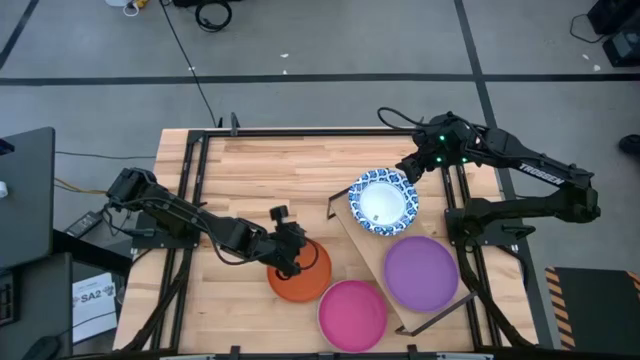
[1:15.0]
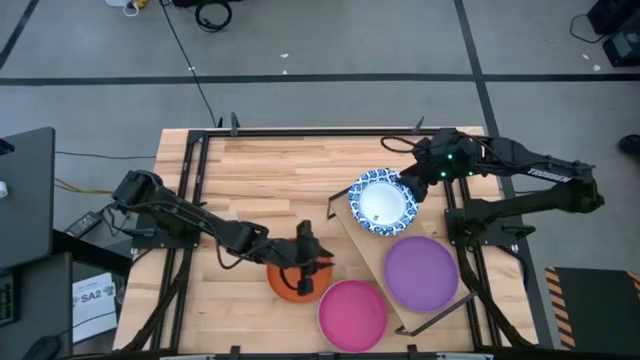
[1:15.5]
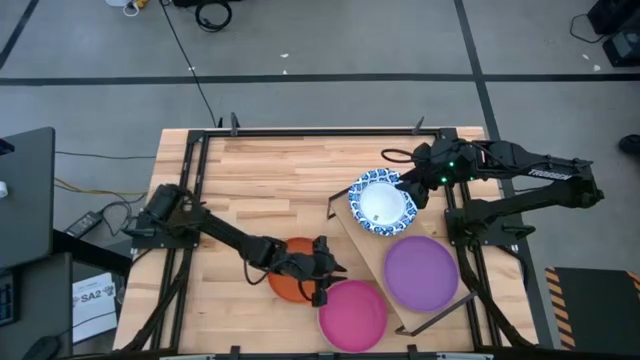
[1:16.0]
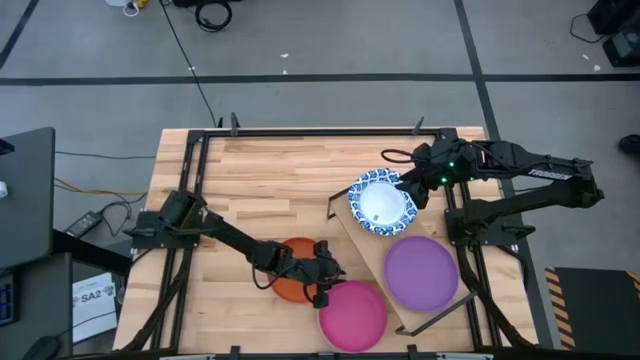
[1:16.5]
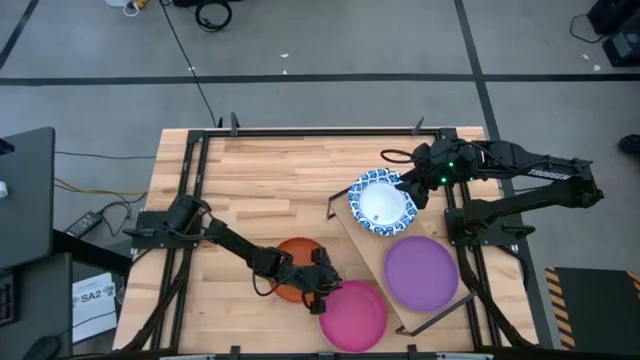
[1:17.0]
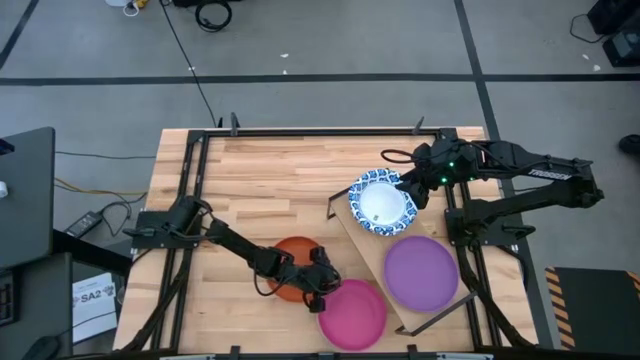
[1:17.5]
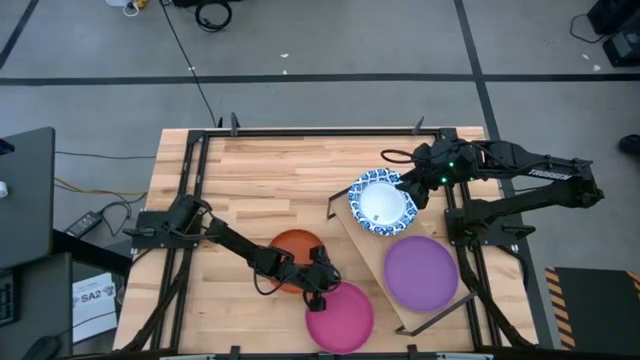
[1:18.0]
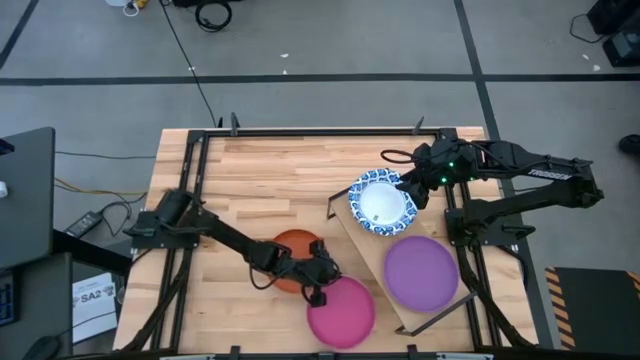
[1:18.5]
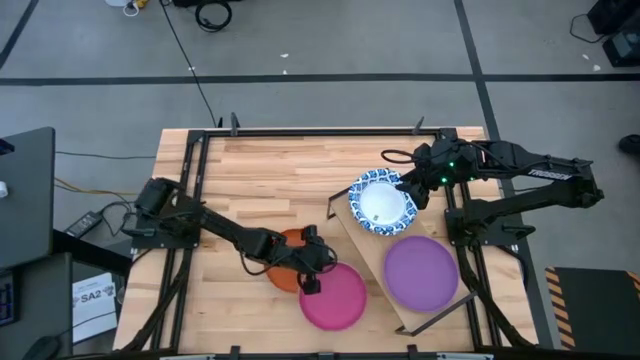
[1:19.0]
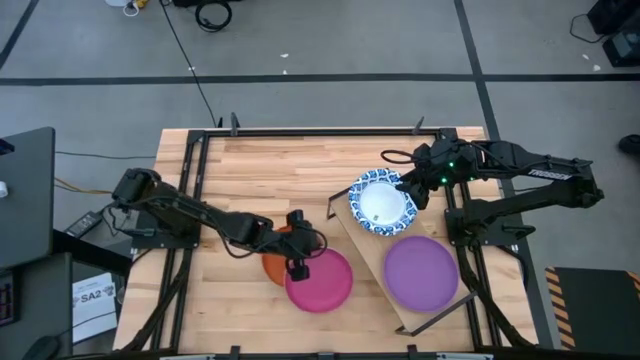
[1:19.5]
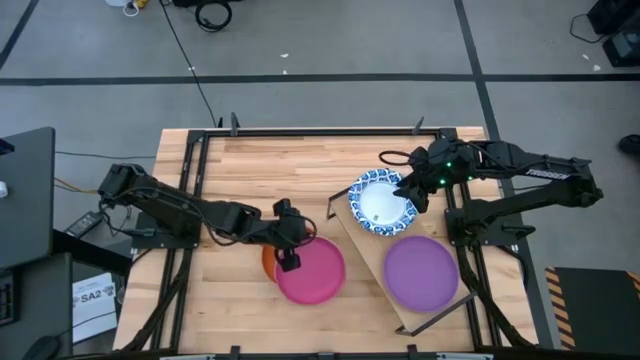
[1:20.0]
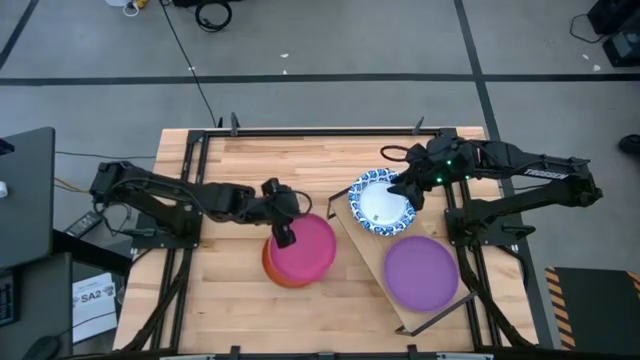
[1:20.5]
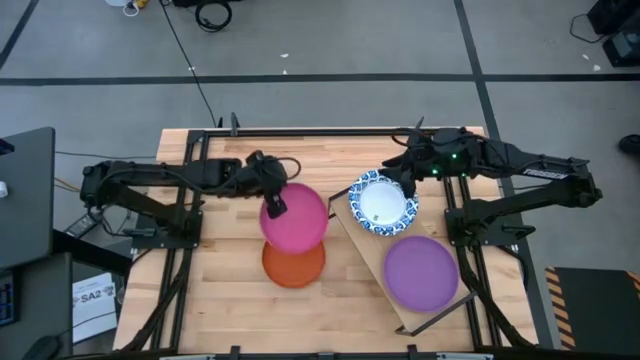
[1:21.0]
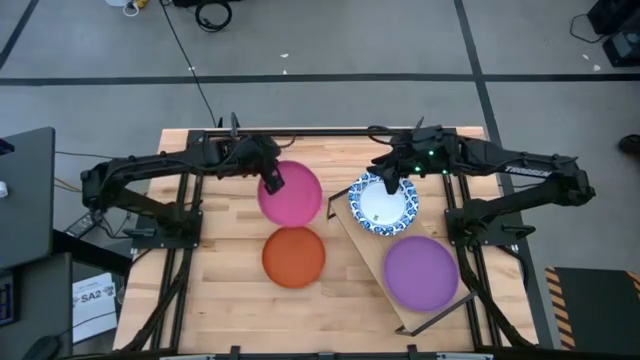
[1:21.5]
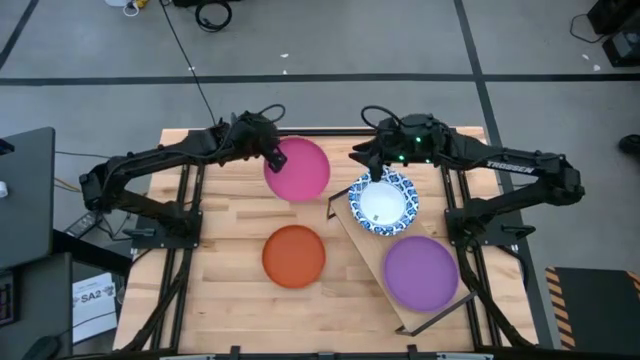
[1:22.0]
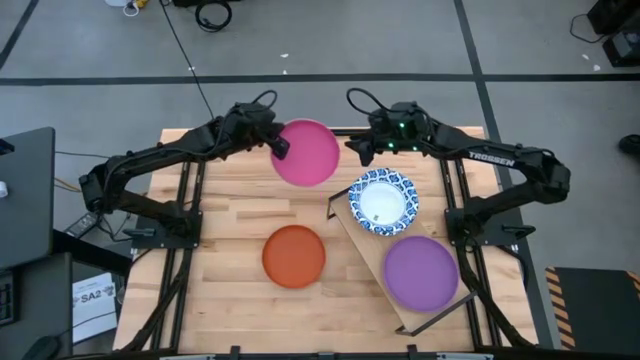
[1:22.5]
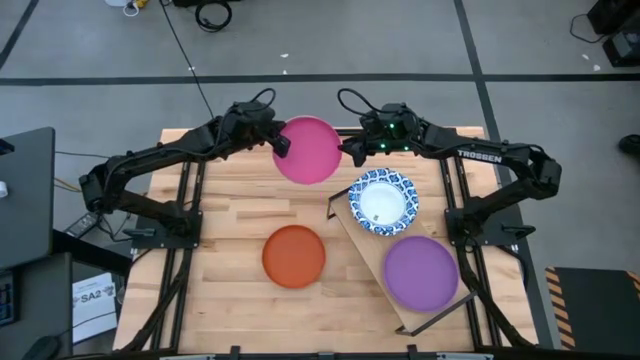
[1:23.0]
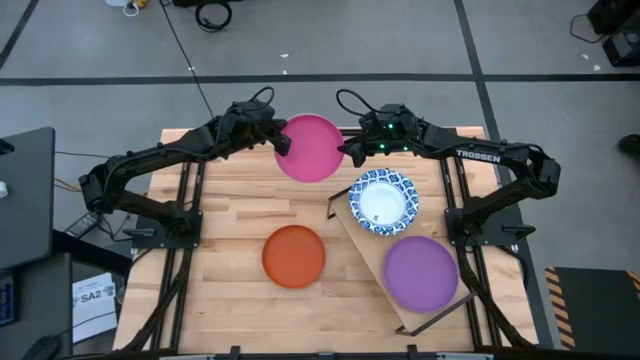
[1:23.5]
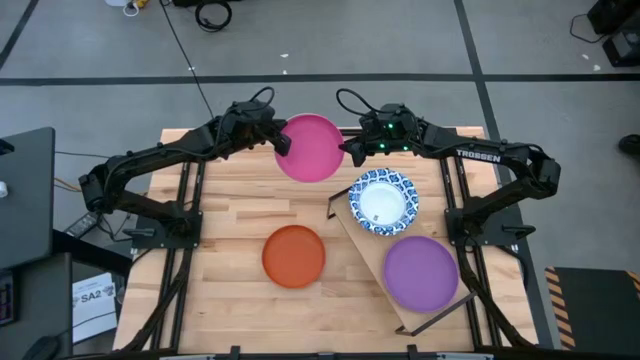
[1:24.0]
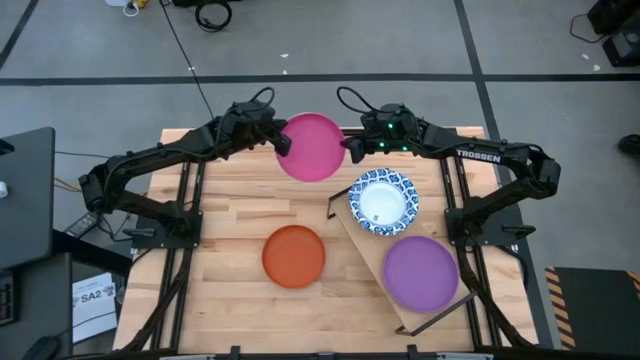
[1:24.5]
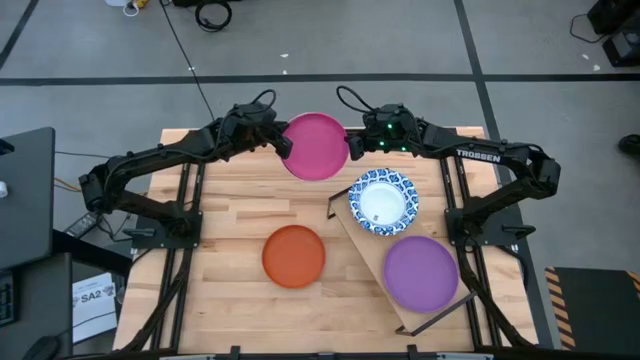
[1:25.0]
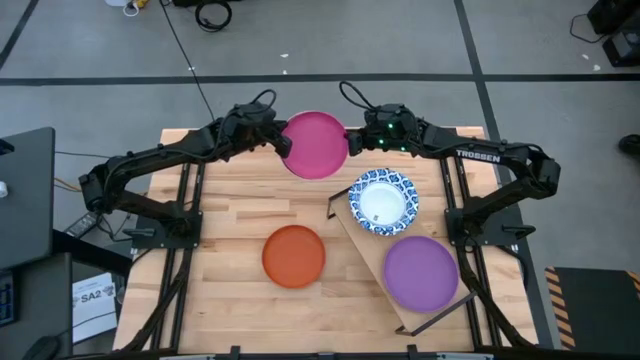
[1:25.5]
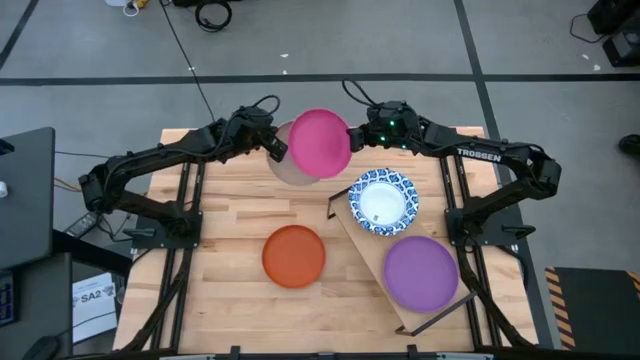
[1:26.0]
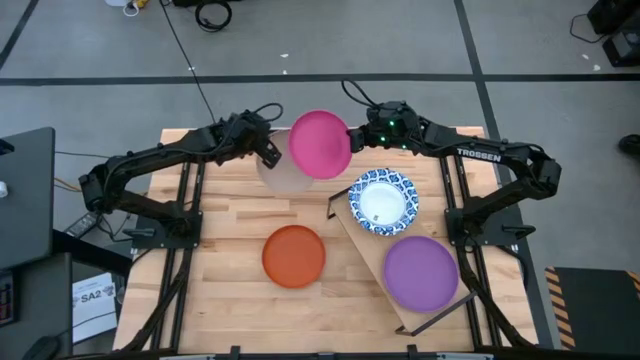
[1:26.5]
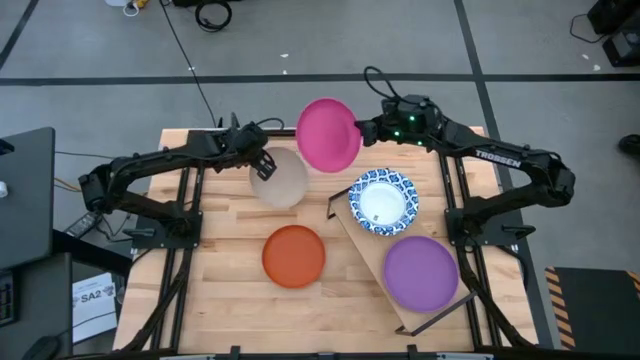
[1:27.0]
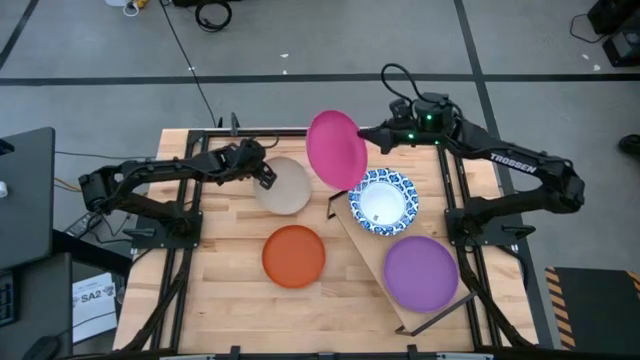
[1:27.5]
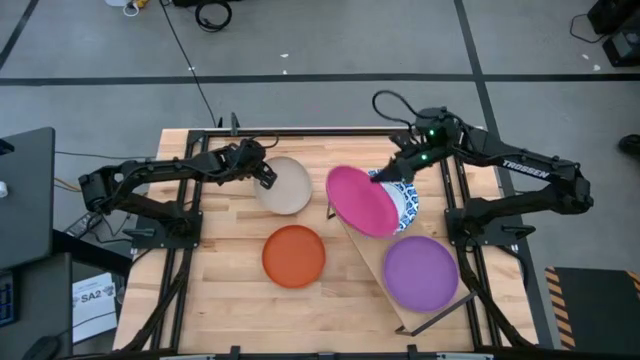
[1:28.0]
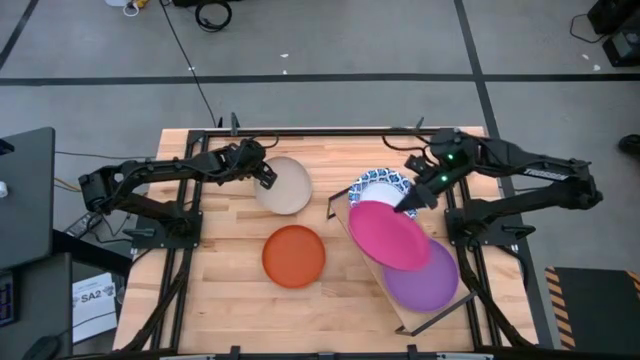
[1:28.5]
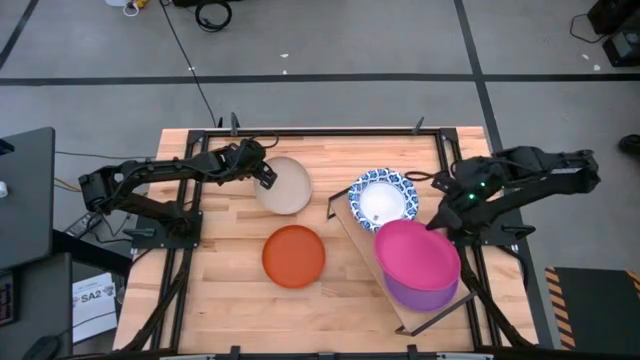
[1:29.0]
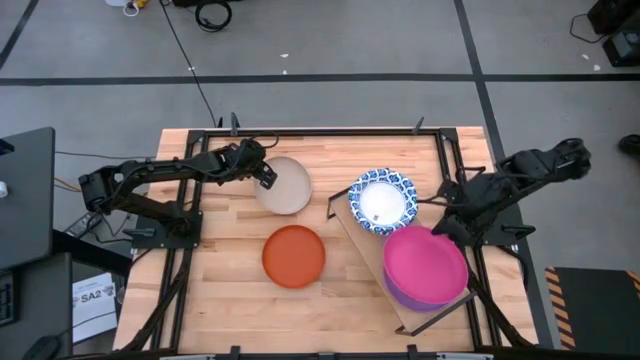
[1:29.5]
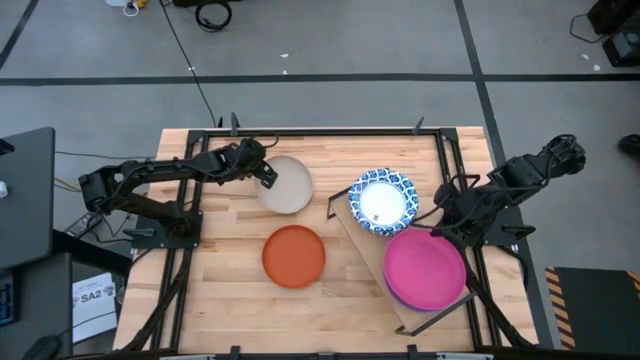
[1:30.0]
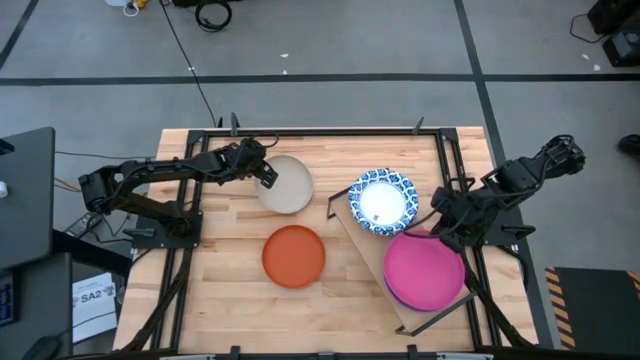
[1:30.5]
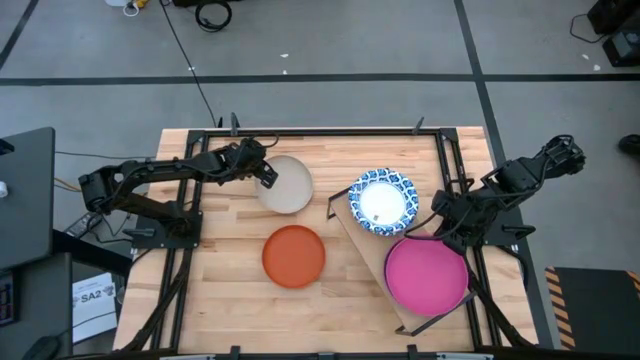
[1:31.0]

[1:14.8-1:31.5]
Task: Place and stack plates onto a shelf
Stack the pink plate on top of the purple plate on the shelf

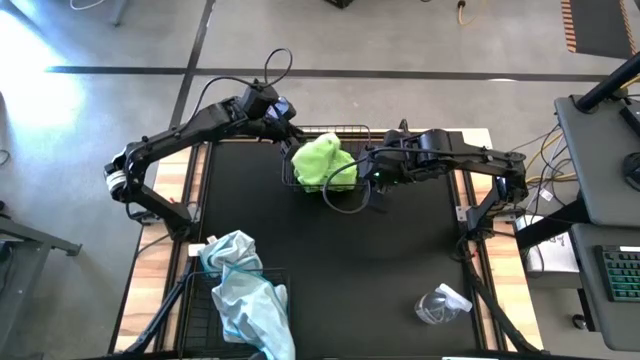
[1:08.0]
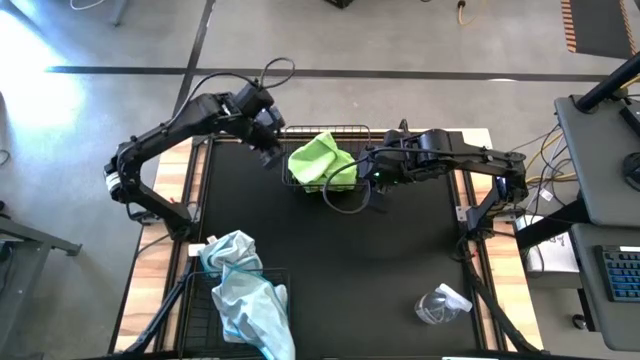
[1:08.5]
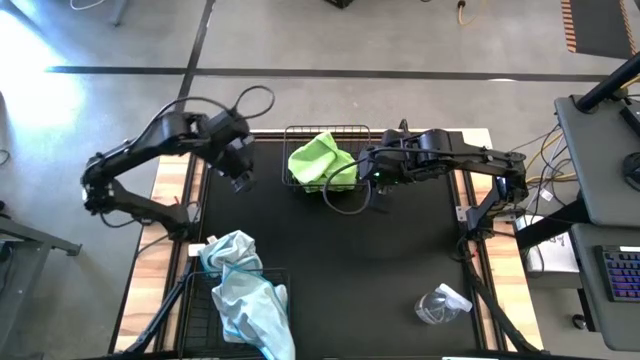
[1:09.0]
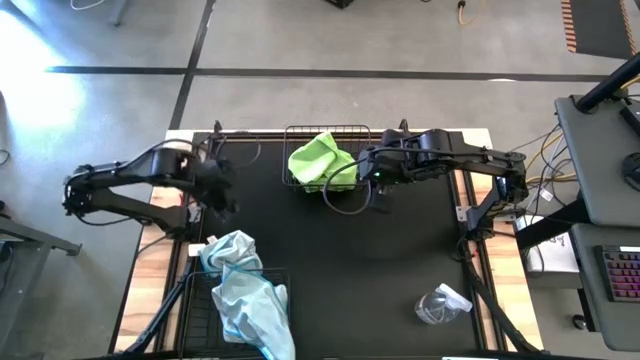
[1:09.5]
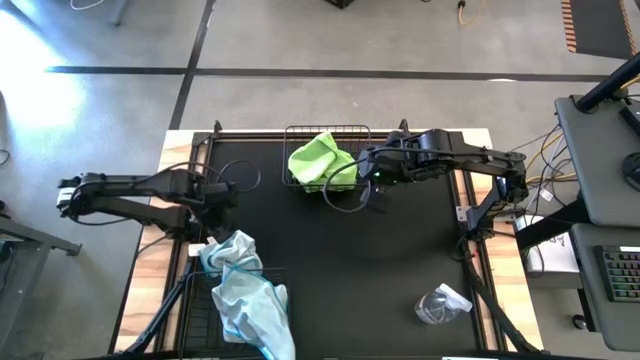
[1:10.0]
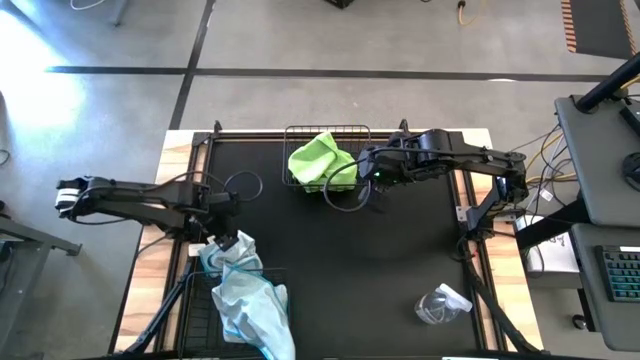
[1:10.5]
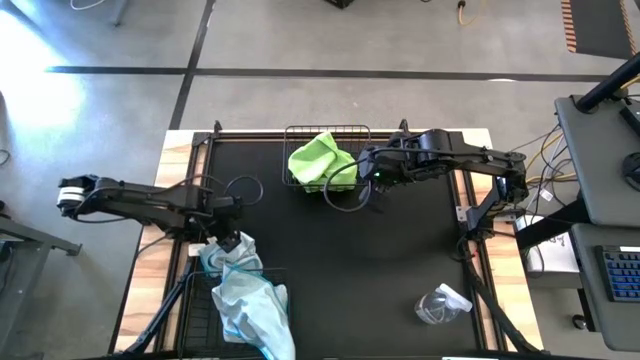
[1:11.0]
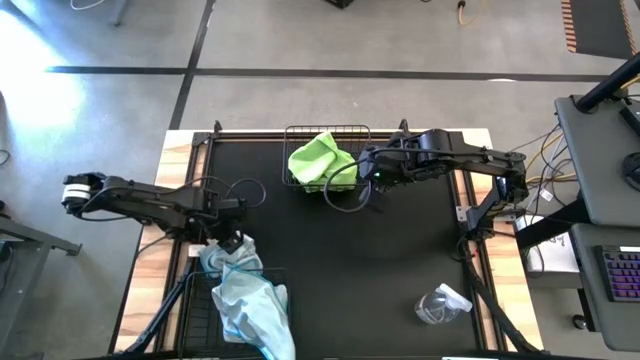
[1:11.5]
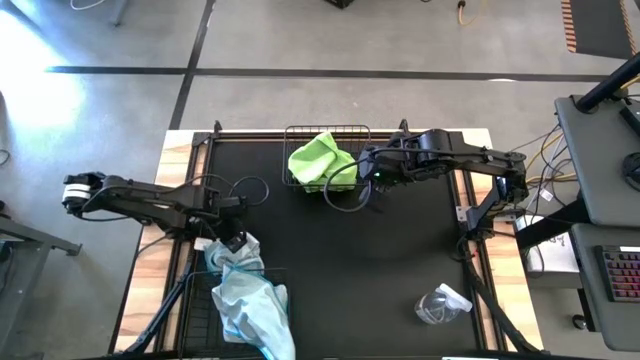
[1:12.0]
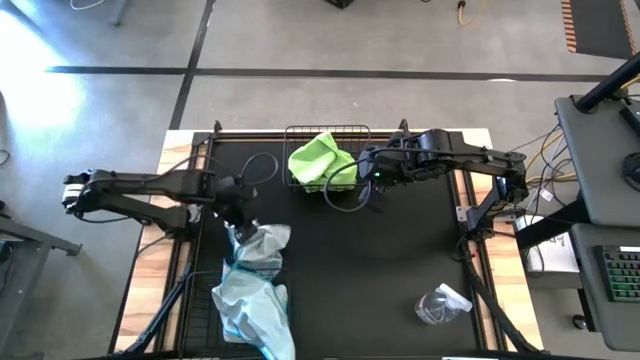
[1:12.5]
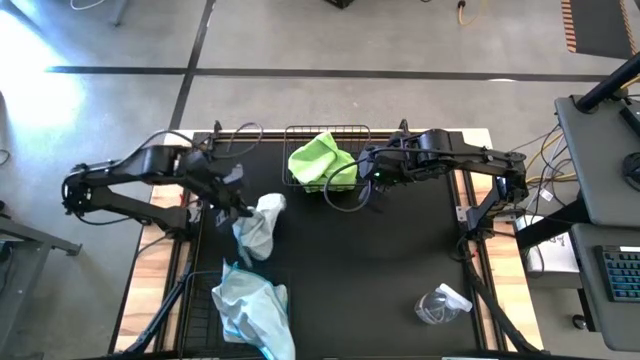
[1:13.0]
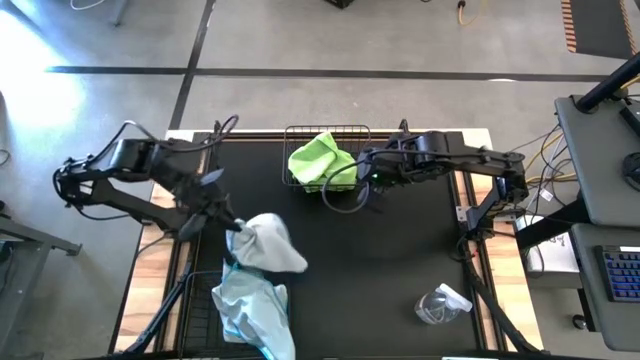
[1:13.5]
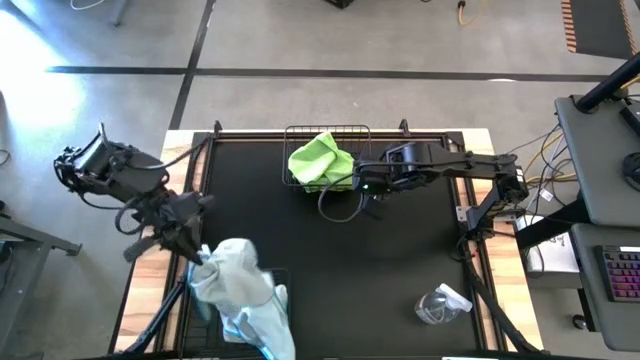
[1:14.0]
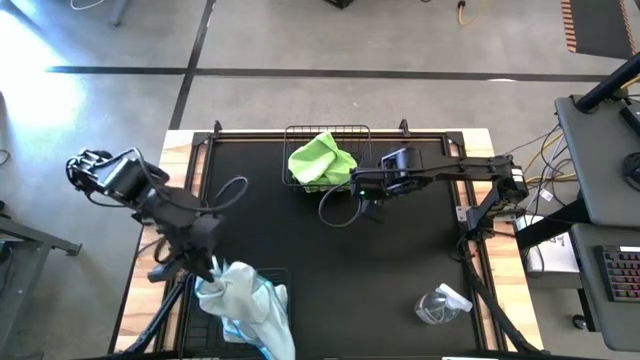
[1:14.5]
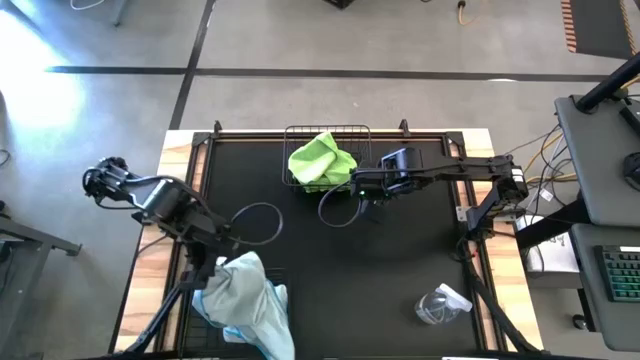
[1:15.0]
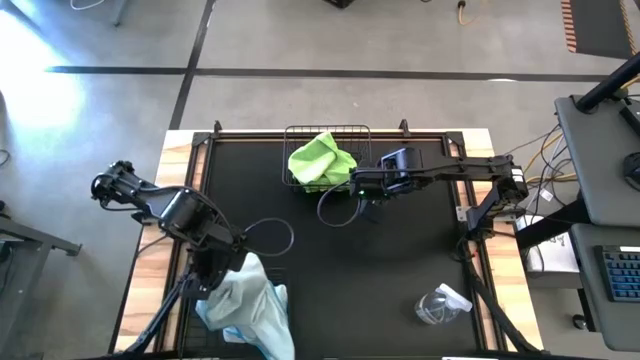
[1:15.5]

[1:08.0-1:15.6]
Task: Sort microfiber towel by color & place in baskets
Put the blue microfiber towel into the bottom black wire basket
